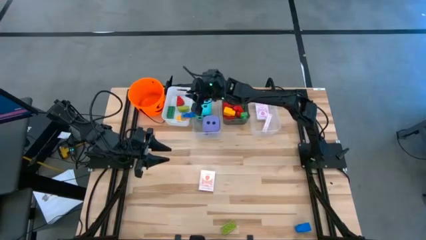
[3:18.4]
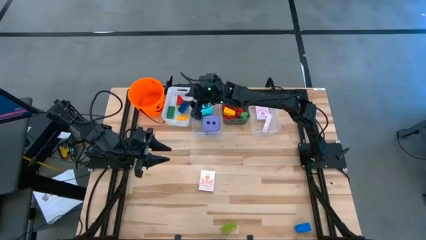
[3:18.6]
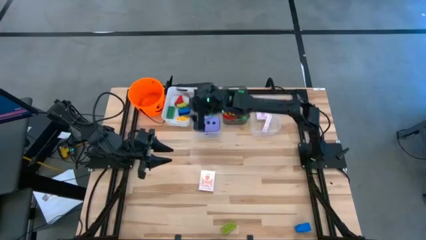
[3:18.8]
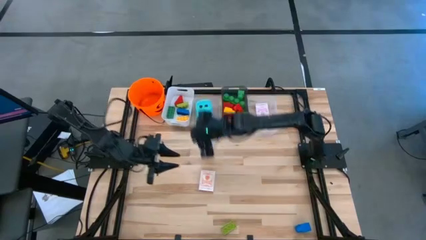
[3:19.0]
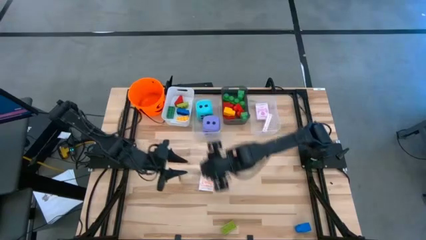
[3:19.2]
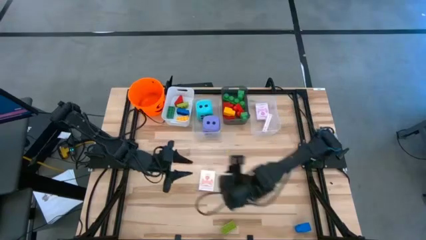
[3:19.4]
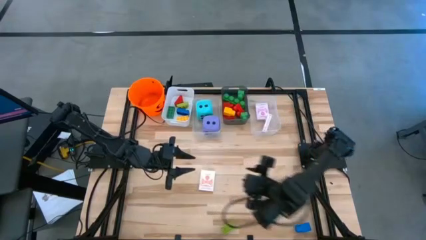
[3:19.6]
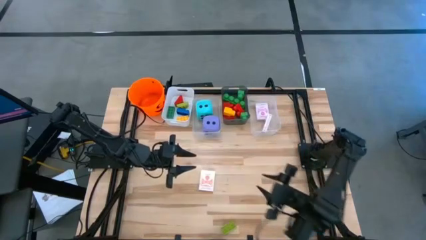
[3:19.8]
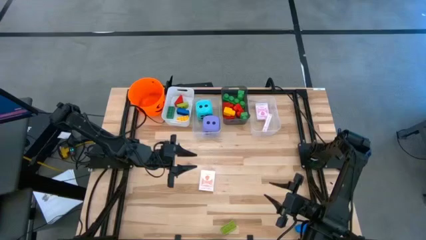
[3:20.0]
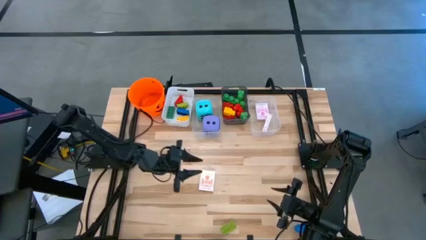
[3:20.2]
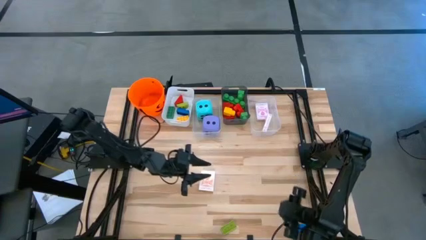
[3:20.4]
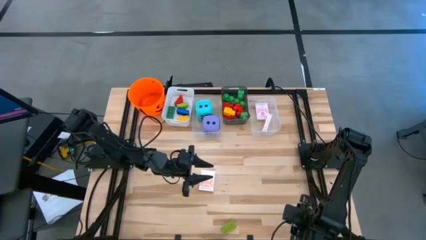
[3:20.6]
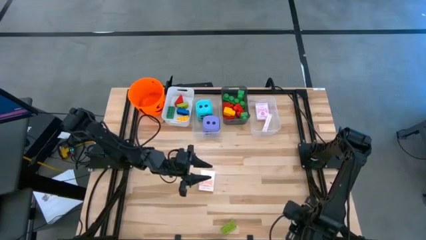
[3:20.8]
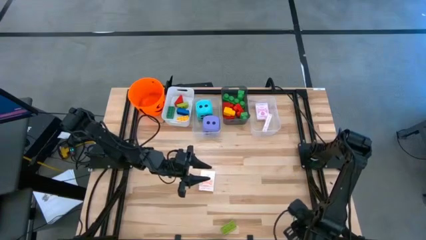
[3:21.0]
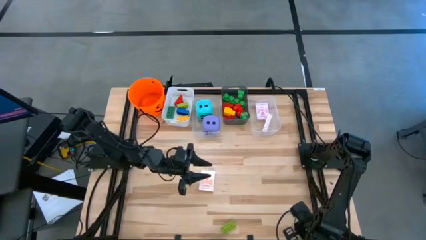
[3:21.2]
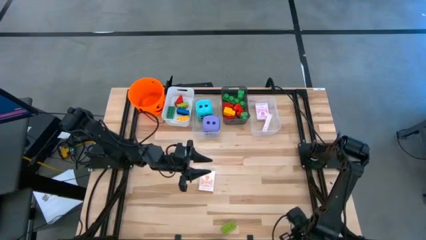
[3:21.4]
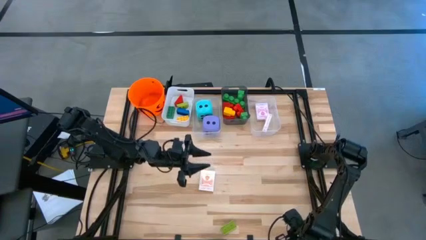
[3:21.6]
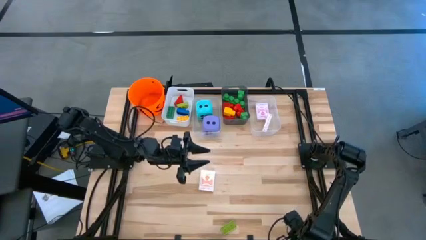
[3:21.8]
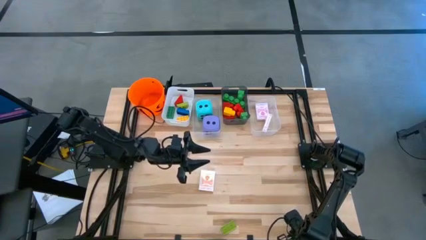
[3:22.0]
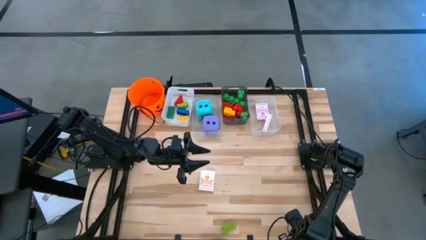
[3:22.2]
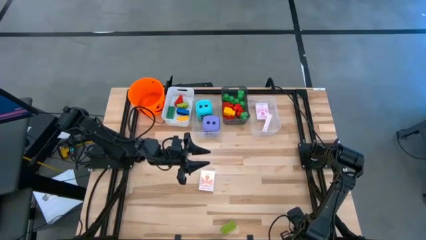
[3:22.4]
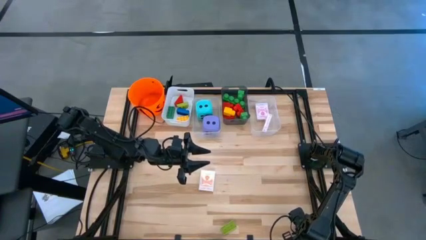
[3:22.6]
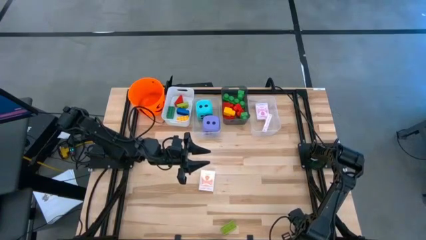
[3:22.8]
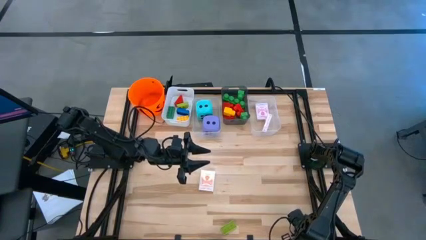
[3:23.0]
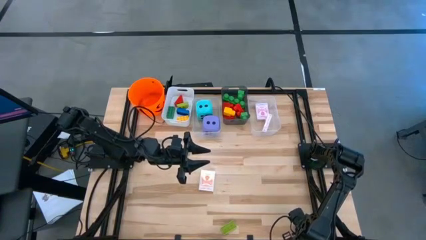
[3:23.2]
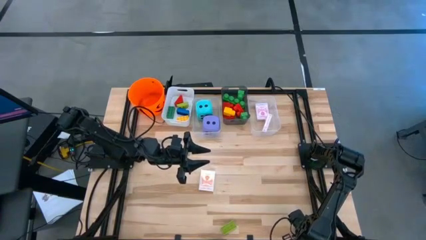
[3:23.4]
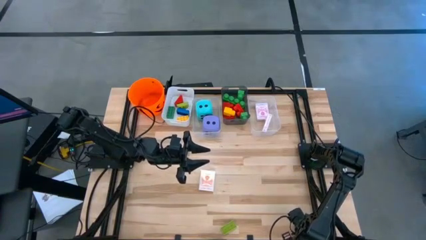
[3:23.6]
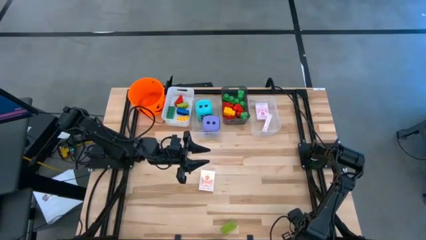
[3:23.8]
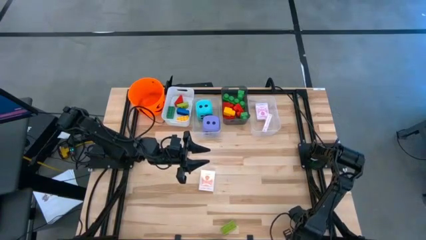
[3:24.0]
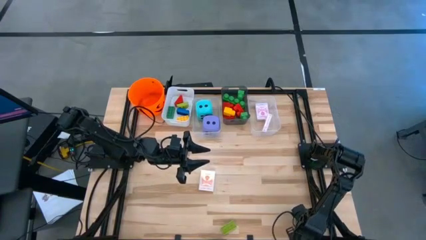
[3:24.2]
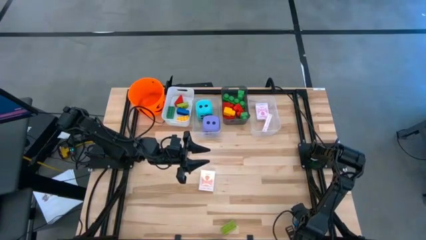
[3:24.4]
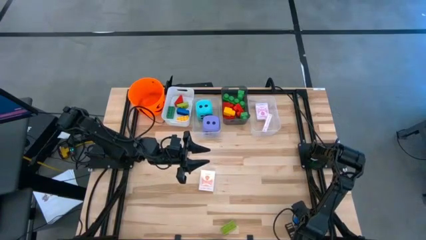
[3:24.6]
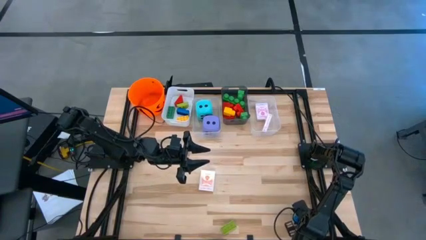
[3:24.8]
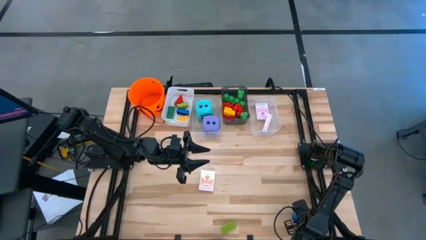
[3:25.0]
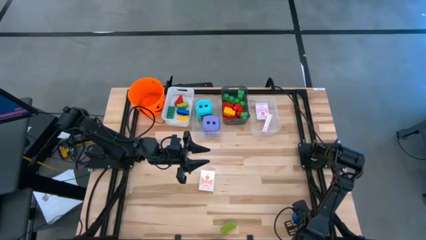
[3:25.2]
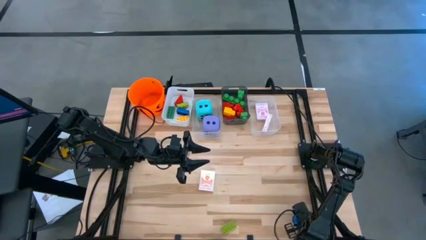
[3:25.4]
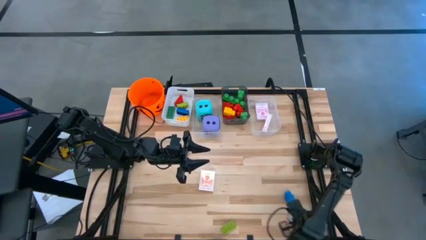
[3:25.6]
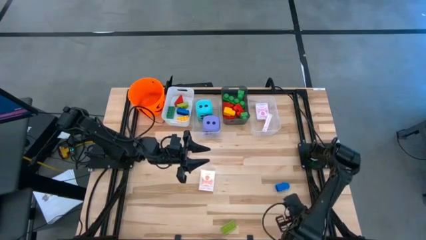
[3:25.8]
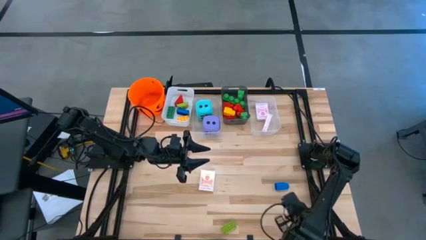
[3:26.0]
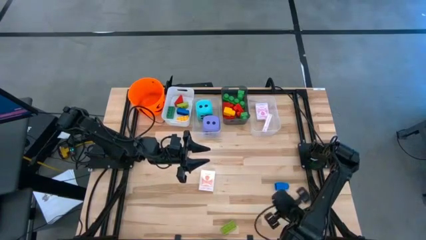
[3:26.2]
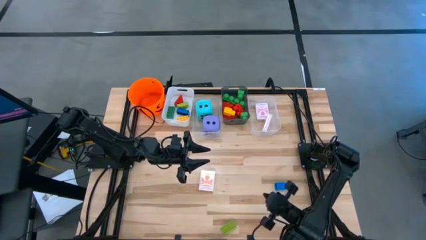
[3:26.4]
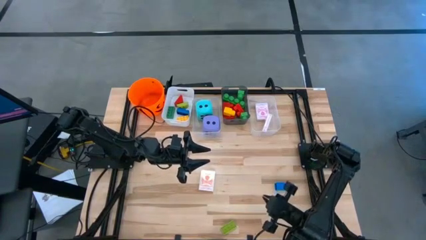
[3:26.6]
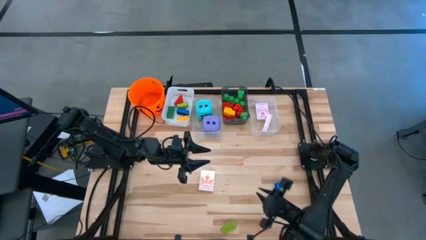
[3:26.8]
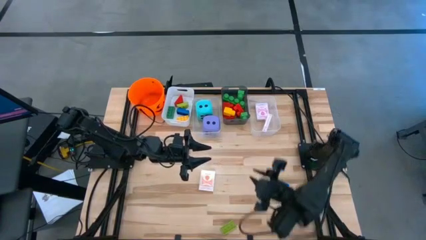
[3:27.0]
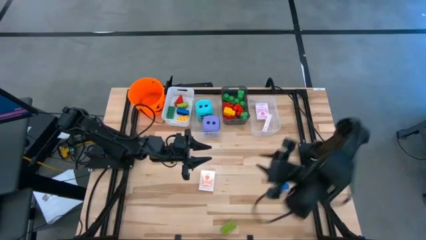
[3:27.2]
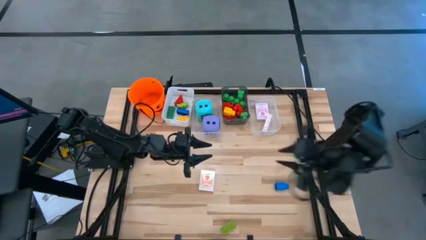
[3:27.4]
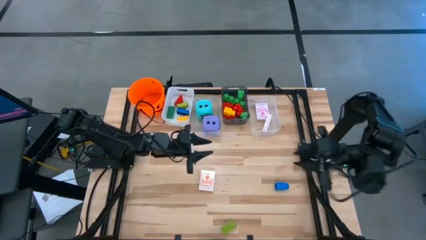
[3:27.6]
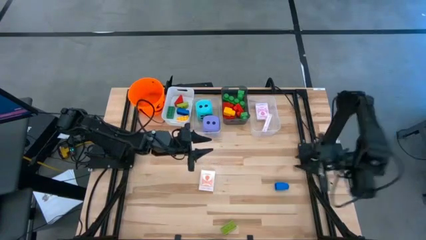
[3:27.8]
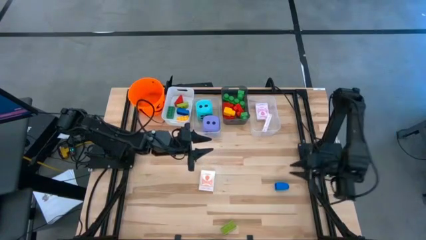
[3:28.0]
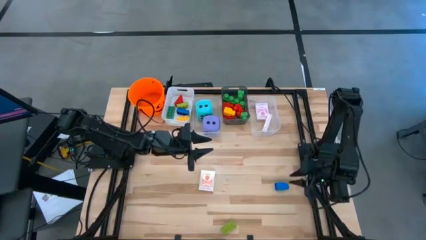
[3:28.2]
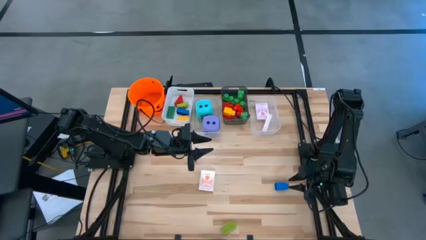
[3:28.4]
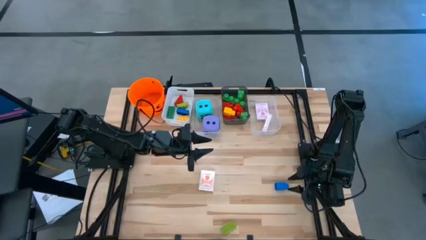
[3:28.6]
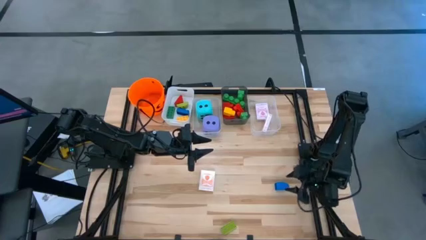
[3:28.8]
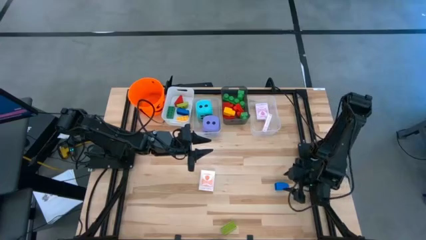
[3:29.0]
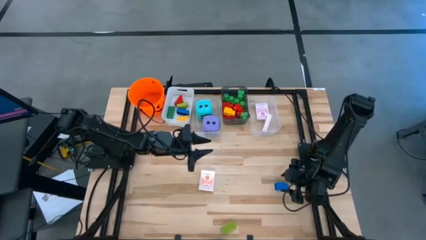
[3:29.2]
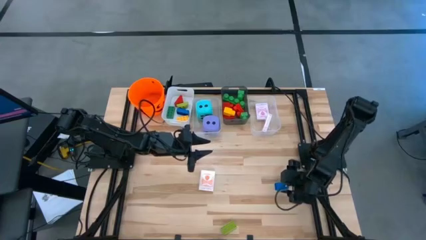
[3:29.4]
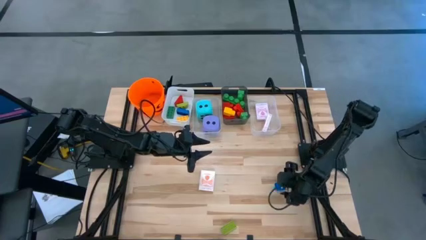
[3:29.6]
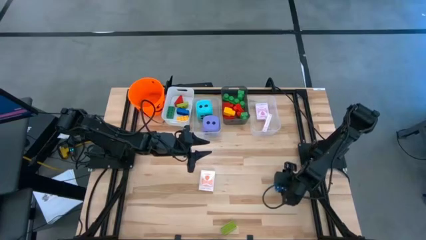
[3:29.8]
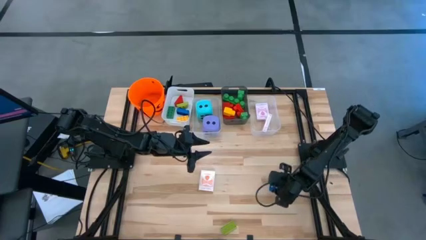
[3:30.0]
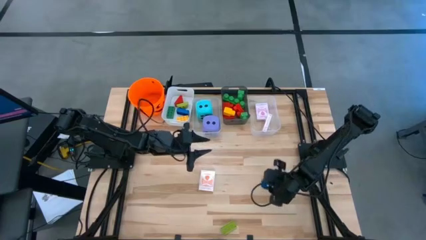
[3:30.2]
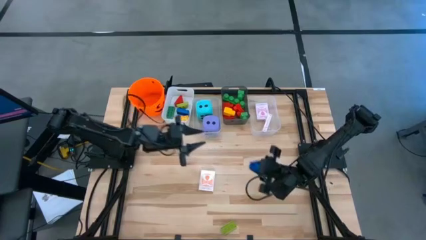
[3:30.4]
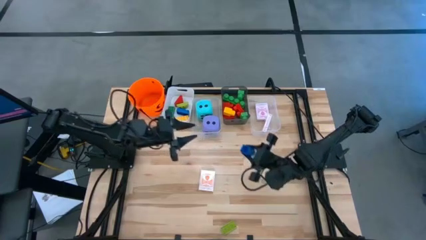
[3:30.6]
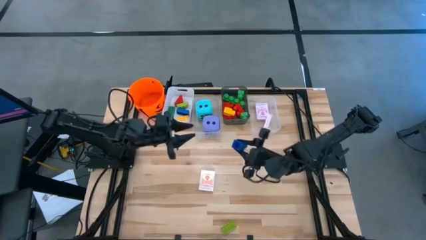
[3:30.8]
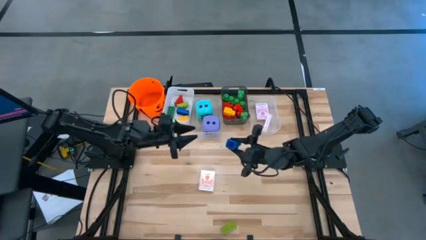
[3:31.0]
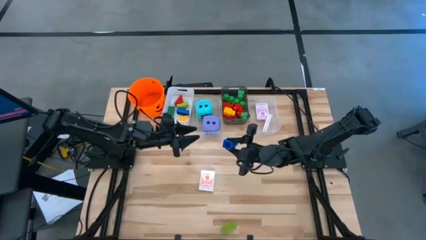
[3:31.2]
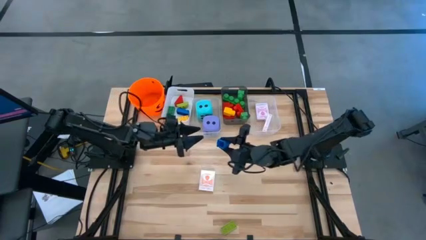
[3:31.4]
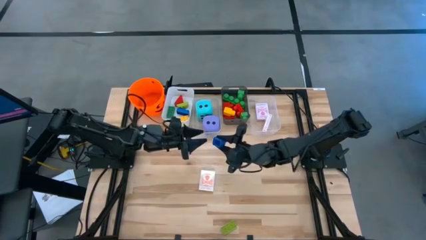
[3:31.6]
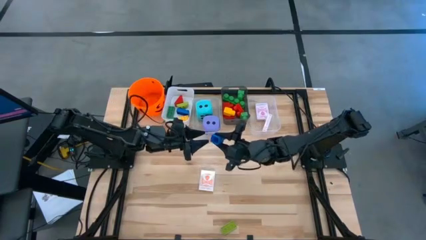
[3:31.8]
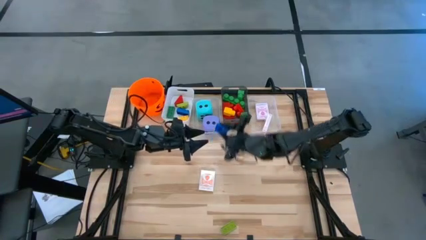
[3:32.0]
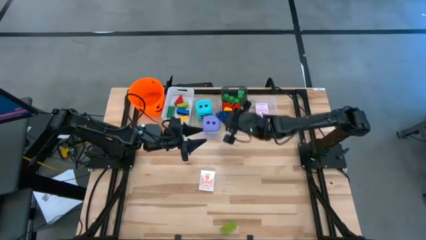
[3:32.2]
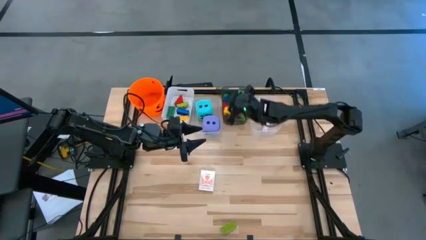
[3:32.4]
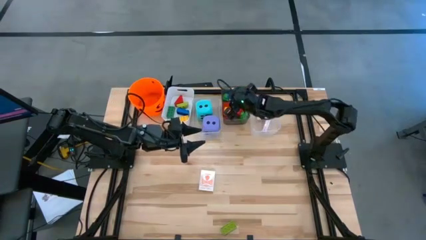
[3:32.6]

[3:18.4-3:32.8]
Task: Pick & Place Toys
Put the large blue game piece into the black bin

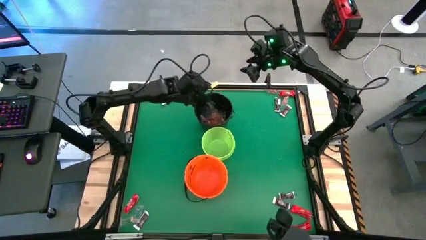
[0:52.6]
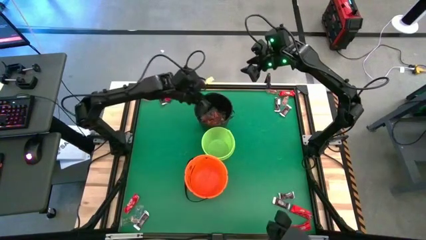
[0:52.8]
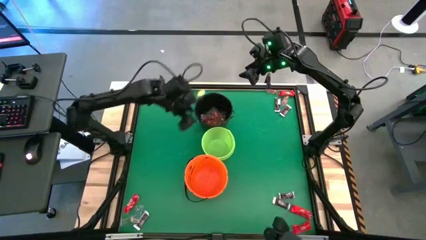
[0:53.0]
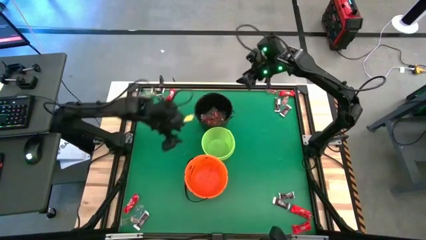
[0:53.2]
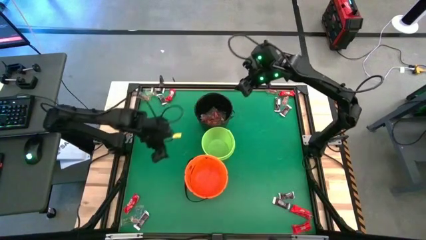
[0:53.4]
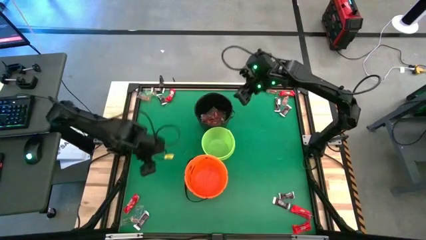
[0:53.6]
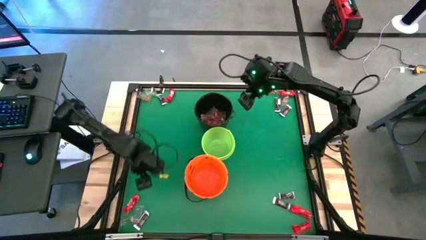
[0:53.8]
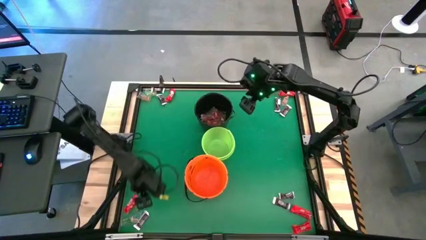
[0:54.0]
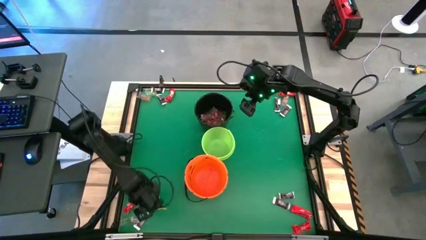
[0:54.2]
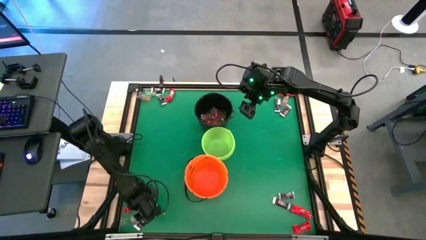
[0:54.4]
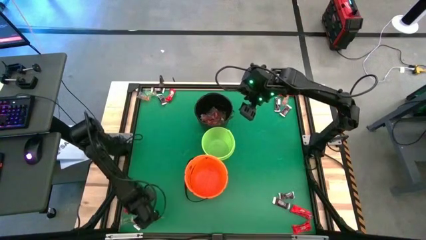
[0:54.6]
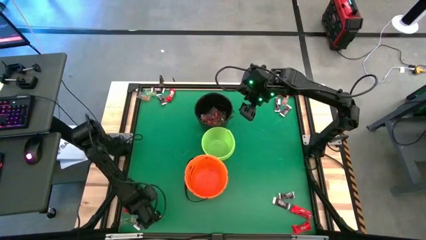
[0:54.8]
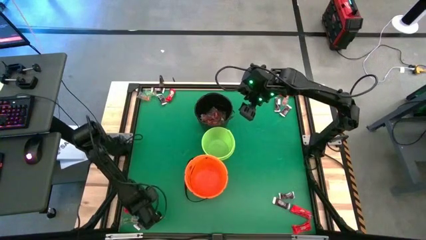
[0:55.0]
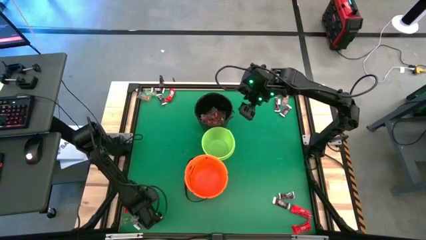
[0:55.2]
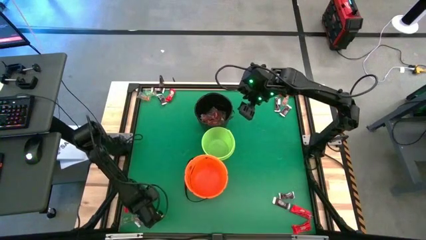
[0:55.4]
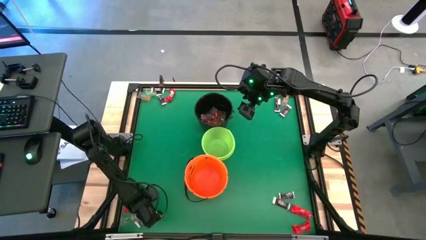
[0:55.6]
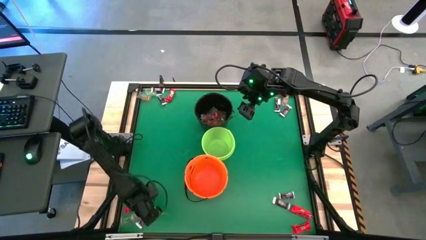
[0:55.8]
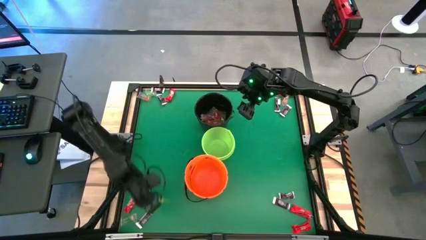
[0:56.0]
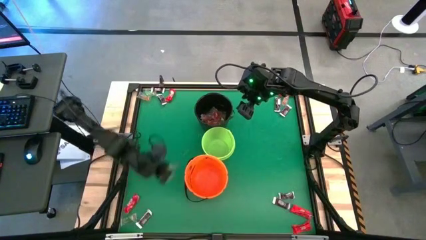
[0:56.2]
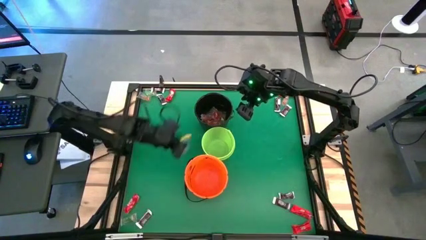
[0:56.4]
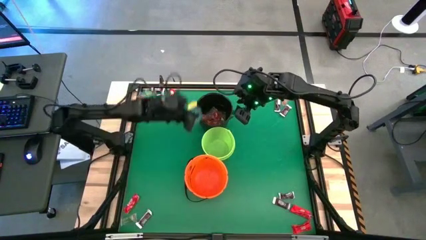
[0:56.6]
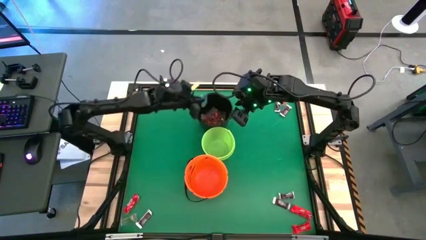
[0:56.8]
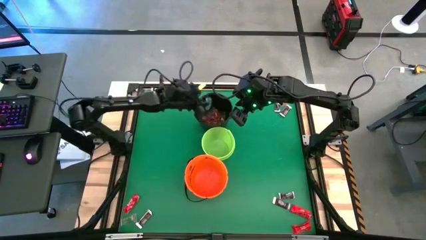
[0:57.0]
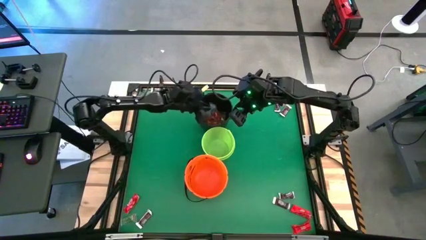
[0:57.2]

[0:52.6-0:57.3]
Task: Sort candy by brand, put in halloween buckets
Put the blue gummy into the black bucket
